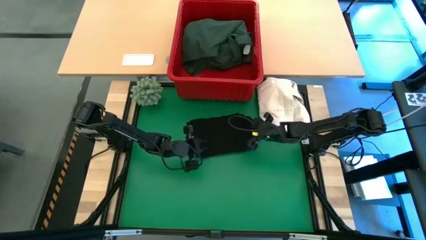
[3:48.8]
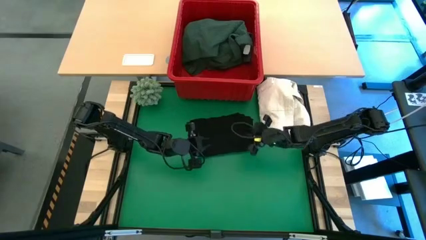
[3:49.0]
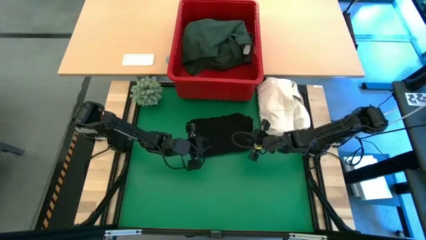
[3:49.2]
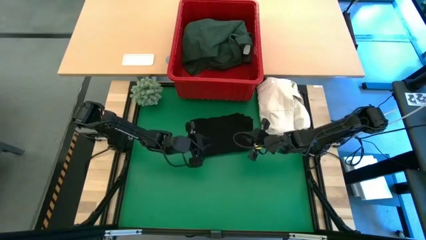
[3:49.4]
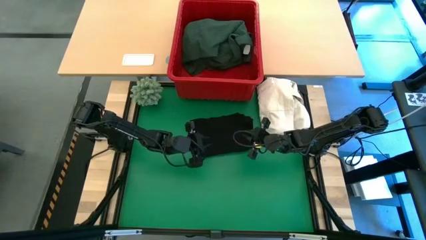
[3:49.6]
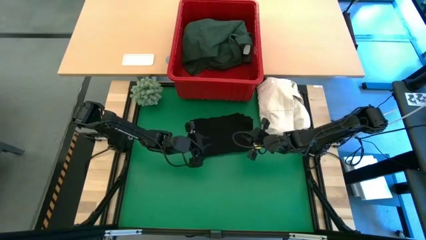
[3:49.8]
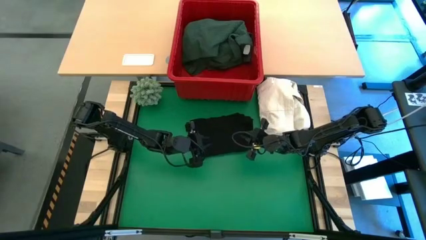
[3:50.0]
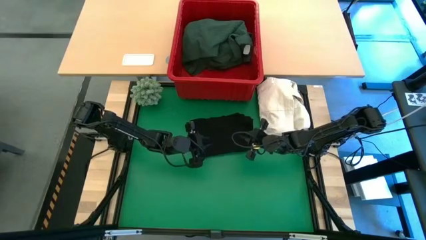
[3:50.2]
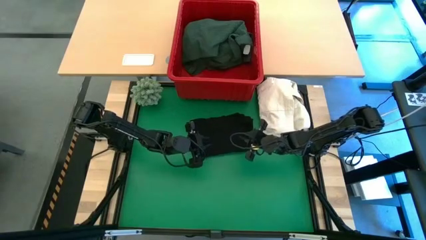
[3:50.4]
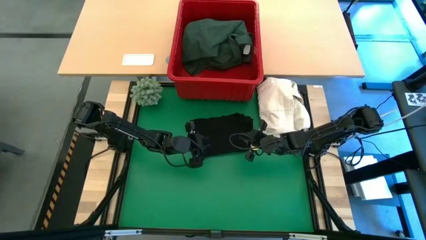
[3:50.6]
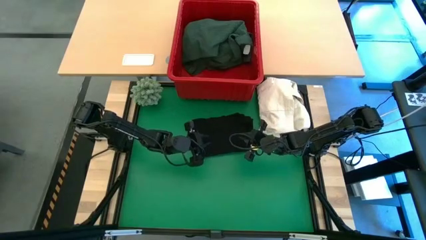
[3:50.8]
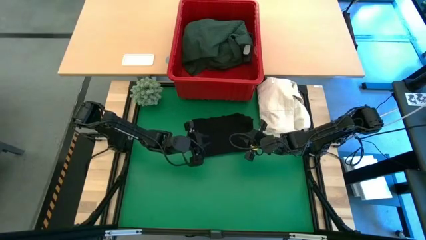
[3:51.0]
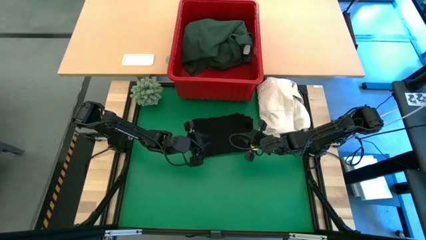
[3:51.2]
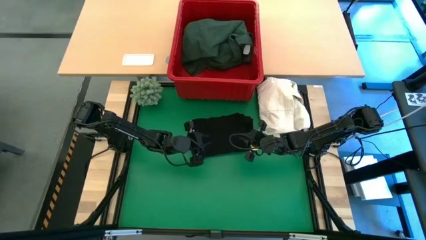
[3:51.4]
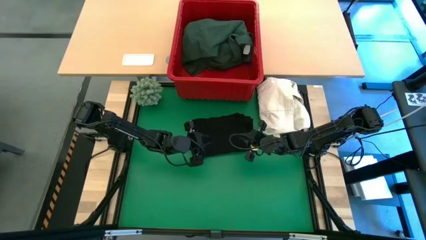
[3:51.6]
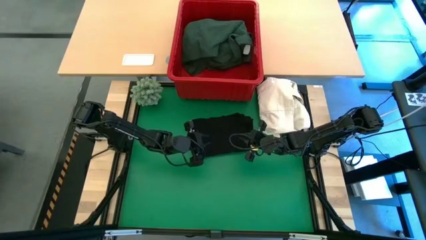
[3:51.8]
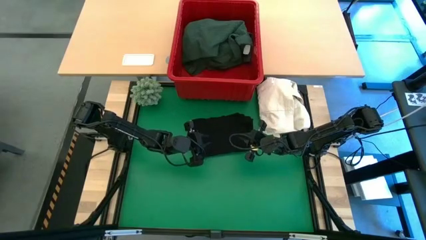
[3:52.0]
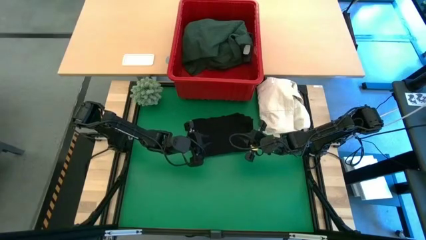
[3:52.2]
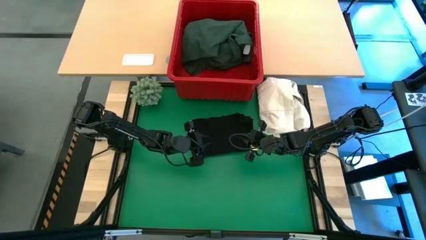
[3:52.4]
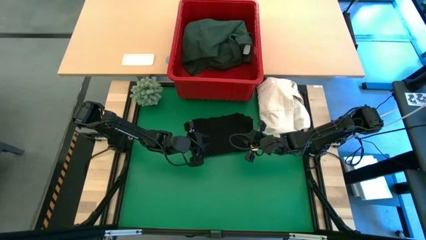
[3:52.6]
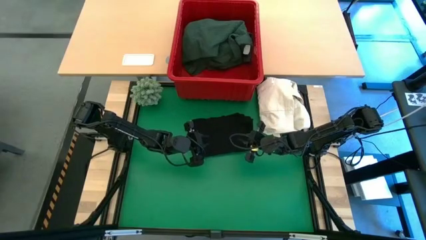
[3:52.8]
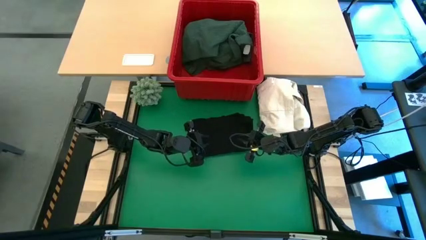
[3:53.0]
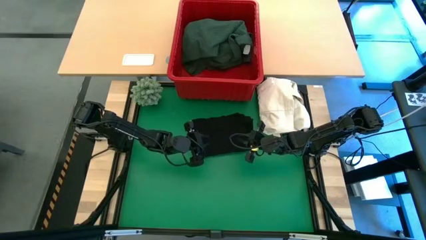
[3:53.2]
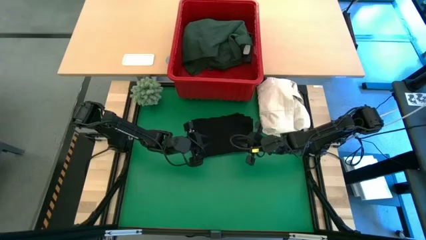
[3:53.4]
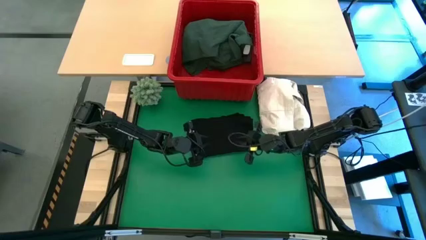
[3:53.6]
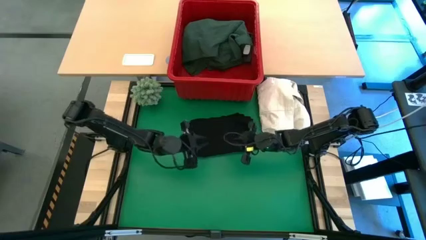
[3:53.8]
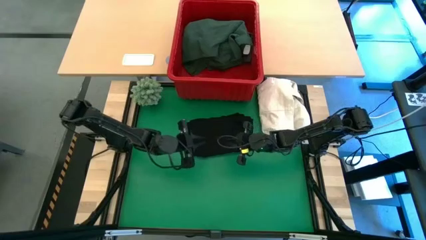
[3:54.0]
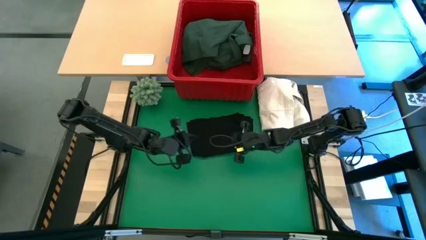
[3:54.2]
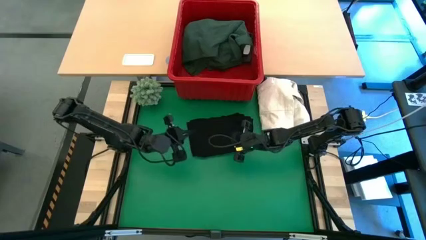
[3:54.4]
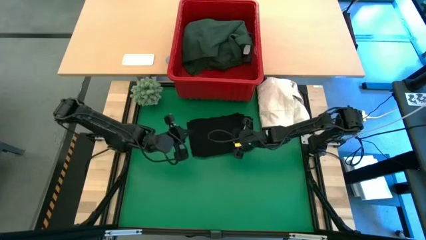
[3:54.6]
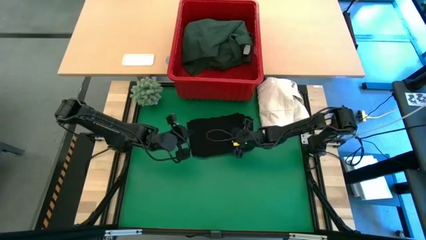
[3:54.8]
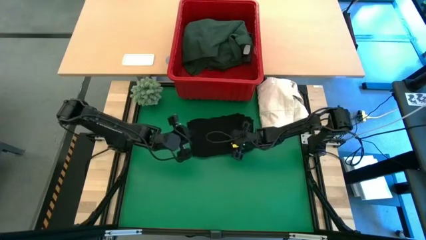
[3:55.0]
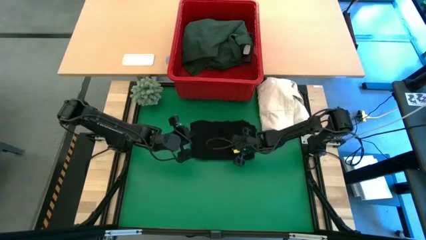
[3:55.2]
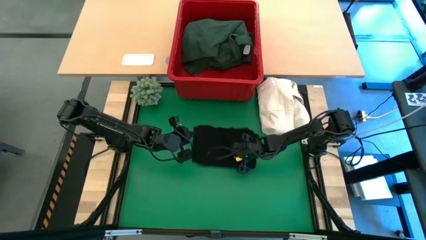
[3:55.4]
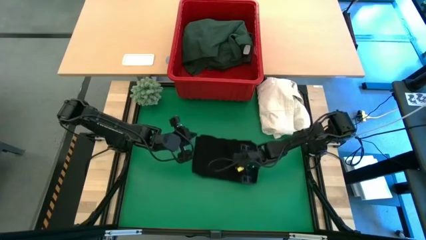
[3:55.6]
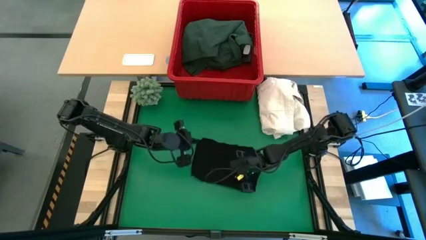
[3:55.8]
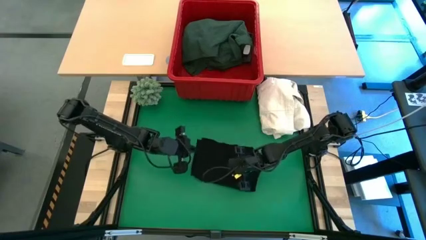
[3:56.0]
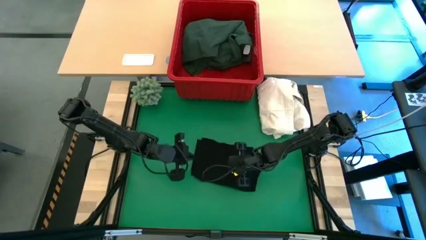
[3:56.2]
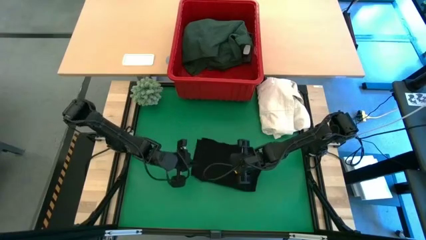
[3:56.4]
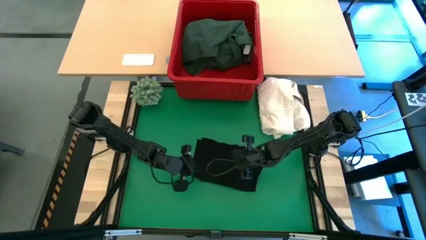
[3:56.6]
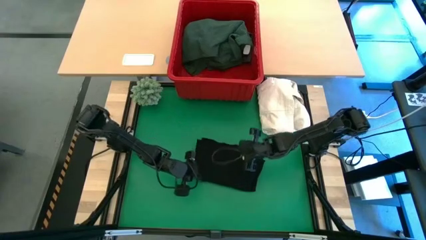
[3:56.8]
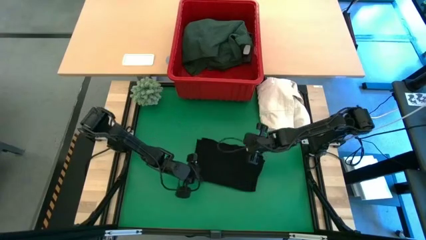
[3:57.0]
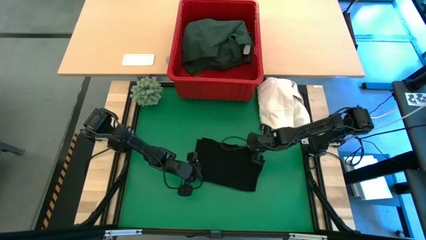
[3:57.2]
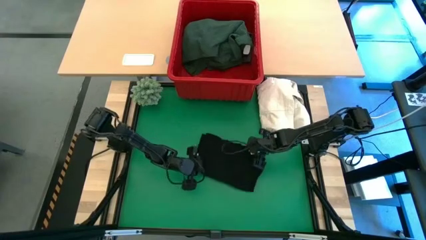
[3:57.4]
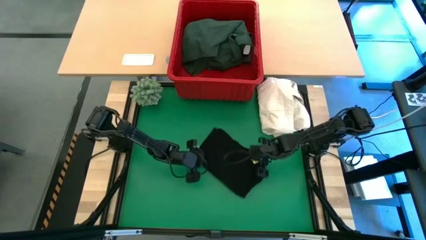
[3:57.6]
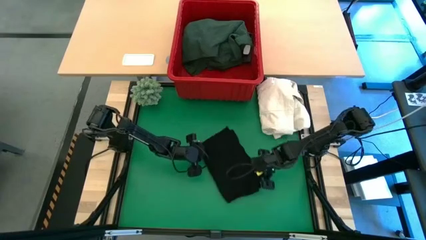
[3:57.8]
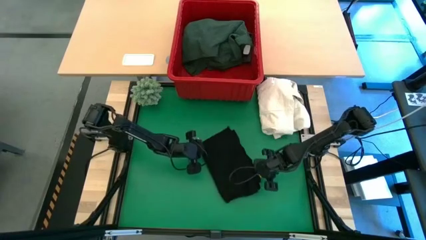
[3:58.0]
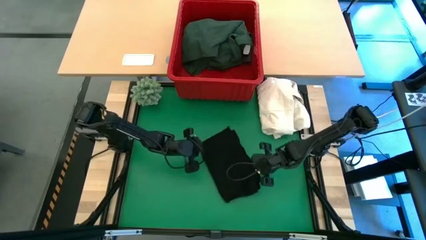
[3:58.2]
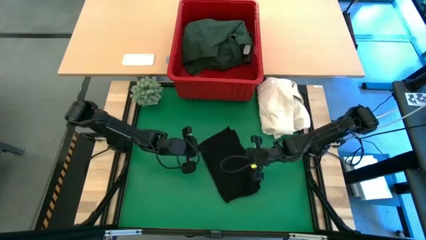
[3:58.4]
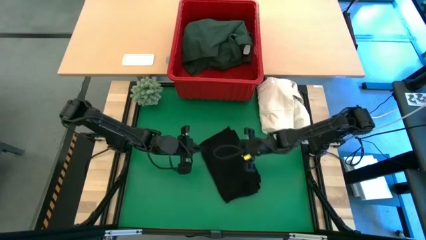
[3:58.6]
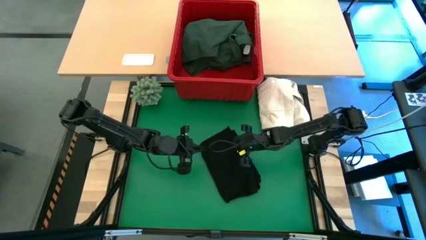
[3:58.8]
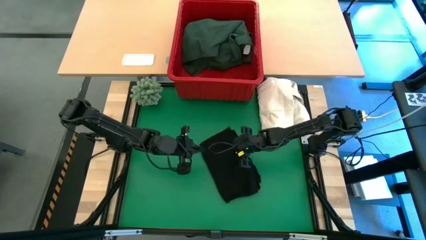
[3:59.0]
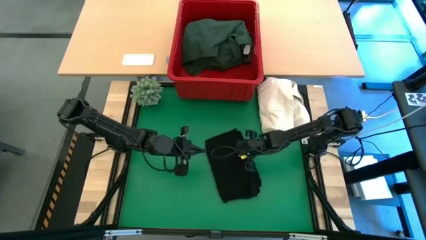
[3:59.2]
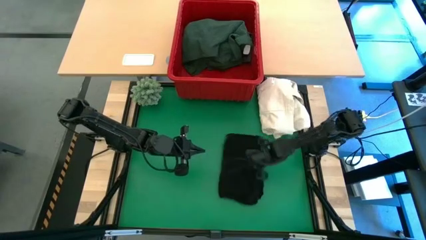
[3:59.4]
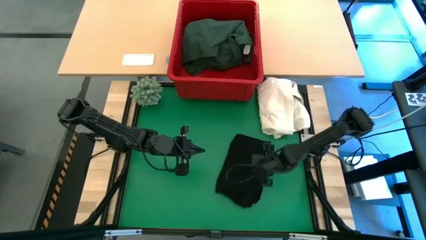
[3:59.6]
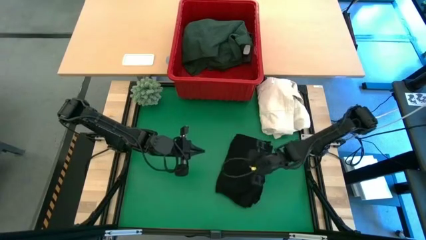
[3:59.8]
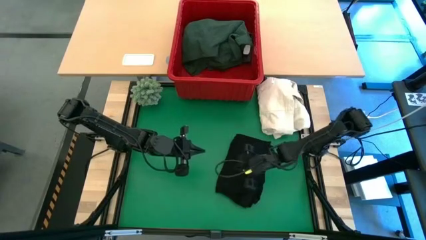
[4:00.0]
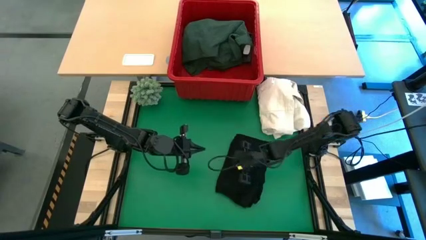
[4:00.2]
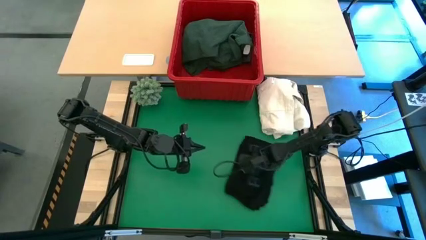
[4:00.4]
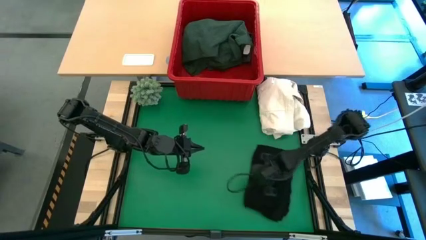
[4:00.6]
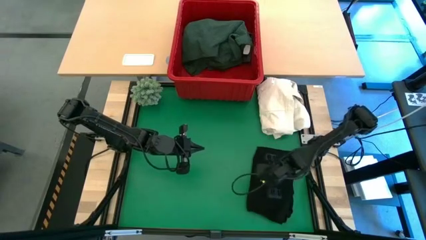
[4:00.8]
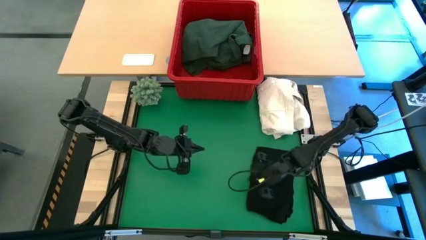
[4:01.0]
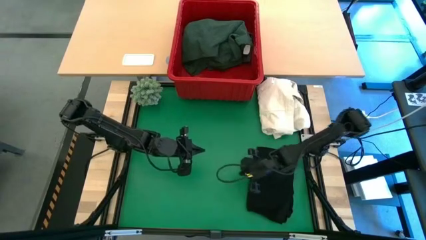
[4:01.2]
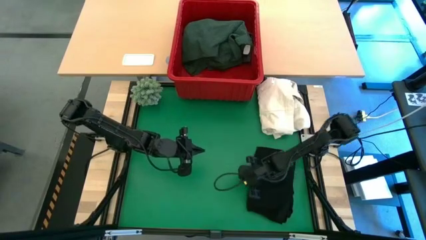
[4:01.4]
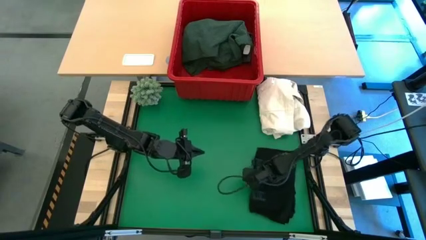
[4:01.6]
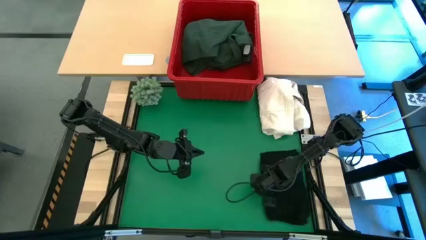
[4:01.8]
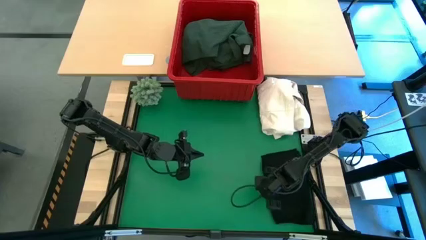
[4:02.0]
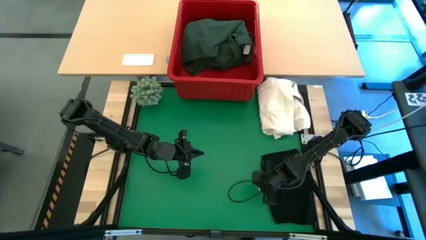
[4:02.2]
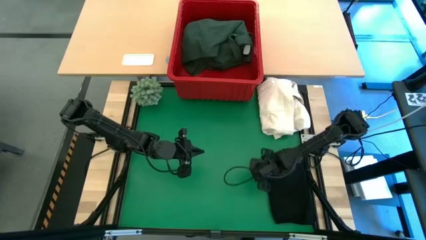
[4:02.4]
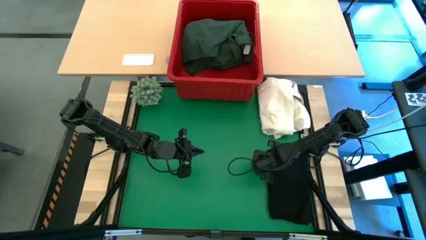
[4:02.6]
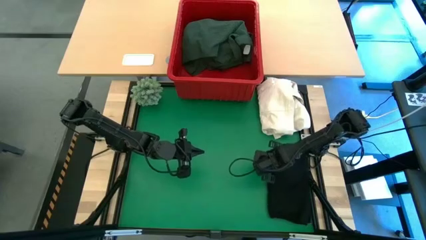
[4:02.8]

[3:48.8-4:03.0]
Task: Fold laundry
Move the folded black shirt to the bottom right of the table

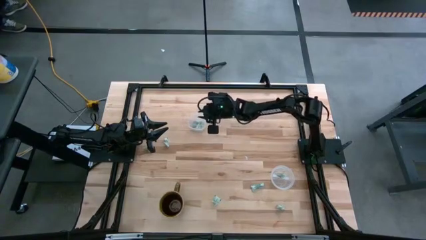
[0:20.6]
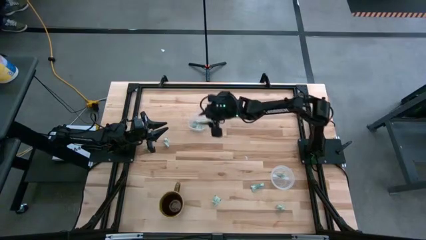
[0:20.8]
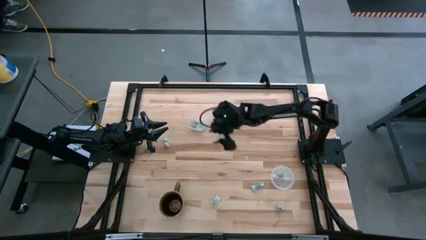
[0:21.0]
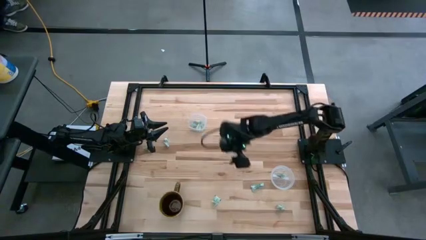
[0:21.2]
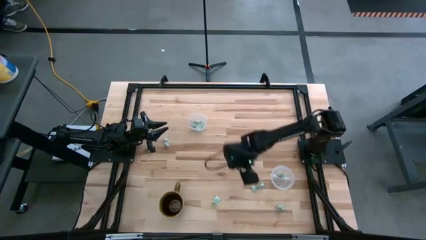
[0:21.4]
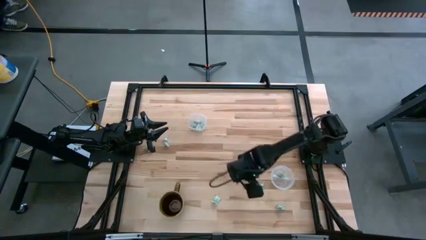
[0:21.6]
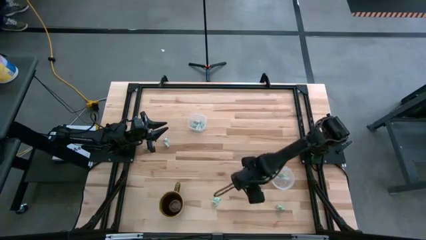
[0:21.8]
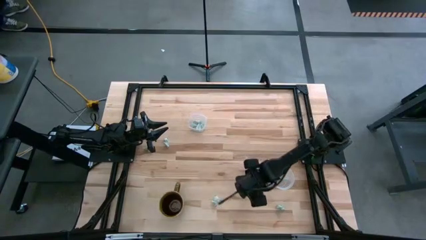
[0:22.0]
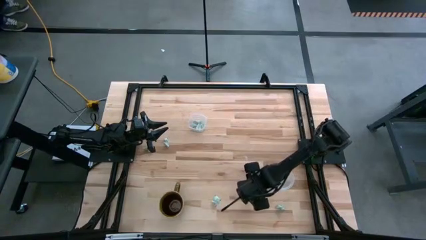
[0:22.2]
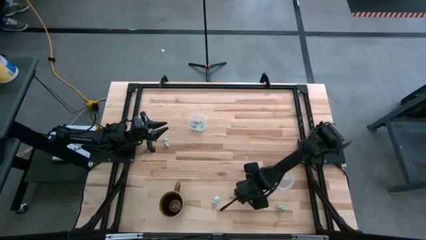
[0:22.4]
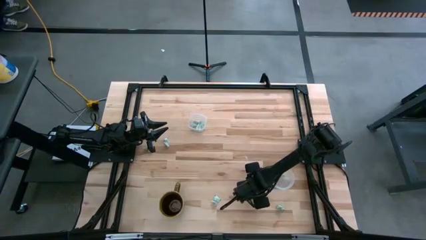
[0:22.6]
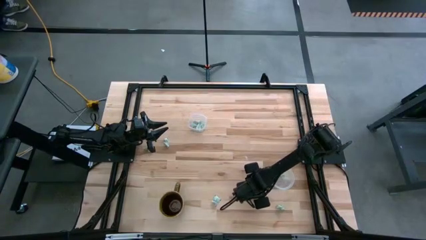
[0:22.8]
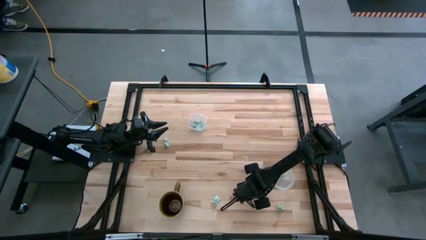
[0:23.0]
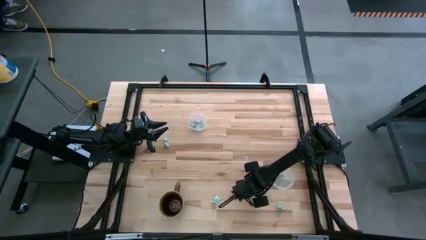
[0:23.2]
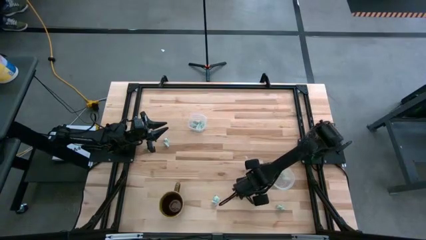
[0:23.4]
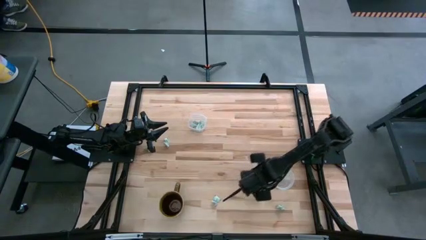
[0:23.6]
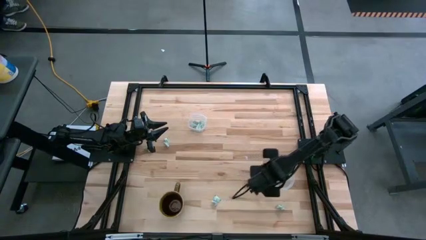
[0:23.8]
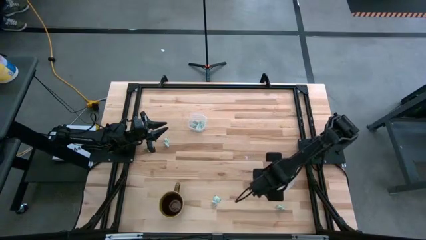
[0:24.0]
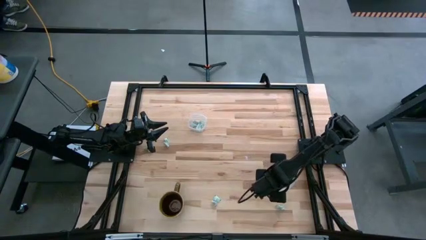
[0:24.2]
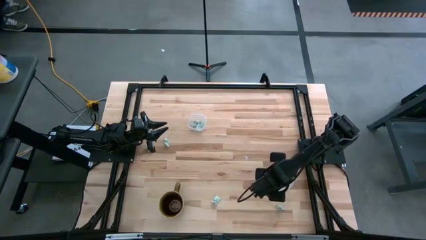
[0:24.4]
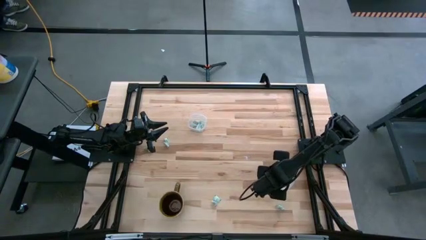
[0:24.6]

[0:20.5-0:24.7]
Task: Pick and place items into bin
Put the white stevia packet into the bottom transparent bin
